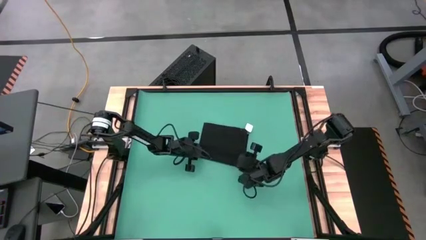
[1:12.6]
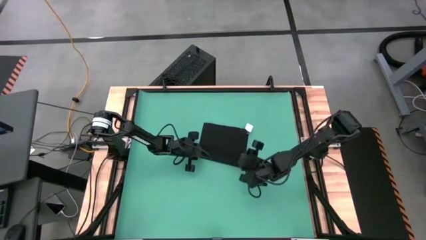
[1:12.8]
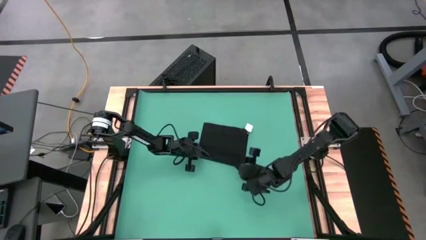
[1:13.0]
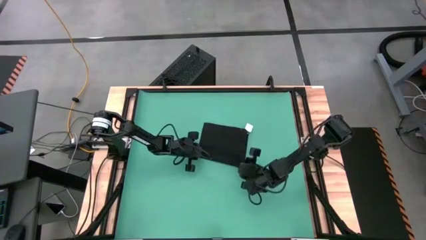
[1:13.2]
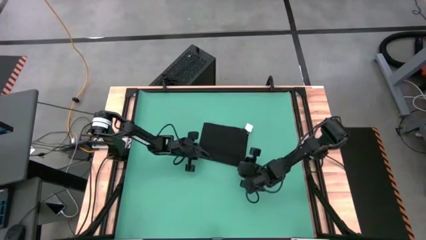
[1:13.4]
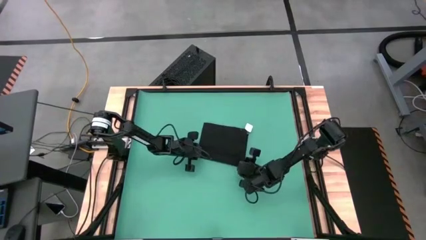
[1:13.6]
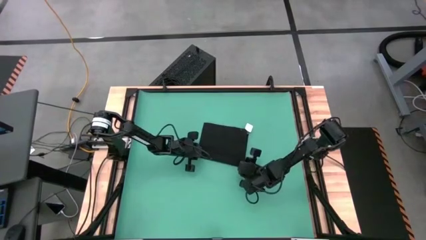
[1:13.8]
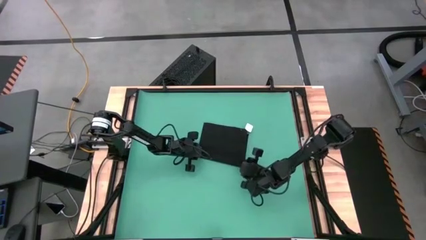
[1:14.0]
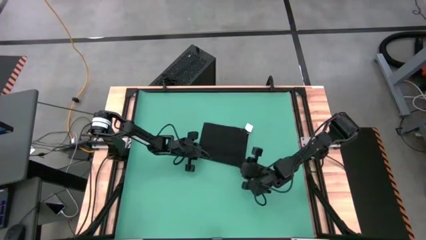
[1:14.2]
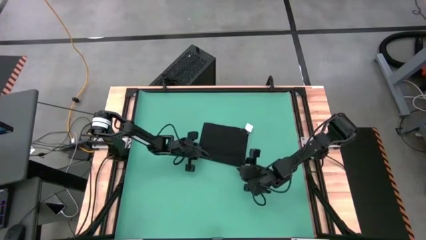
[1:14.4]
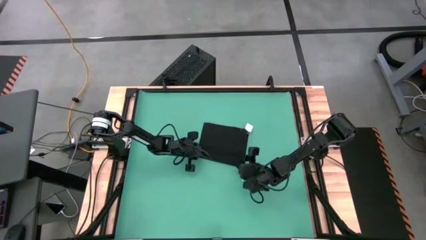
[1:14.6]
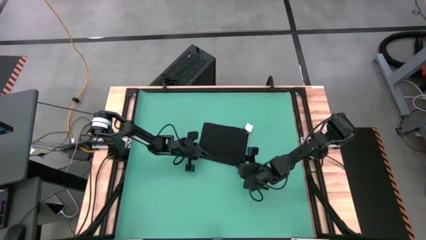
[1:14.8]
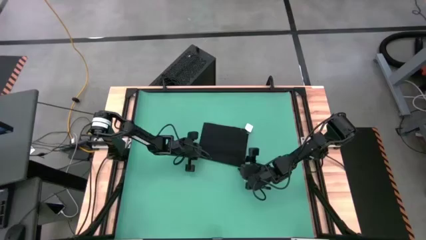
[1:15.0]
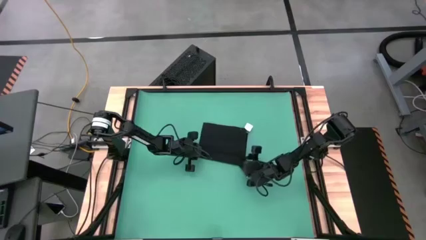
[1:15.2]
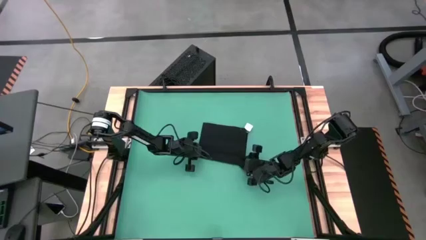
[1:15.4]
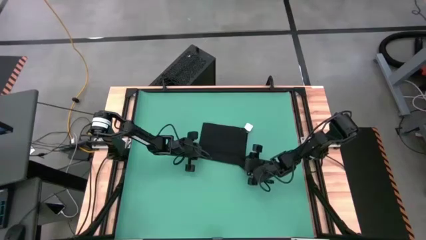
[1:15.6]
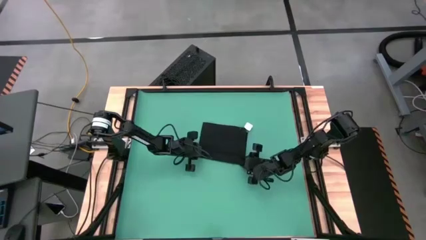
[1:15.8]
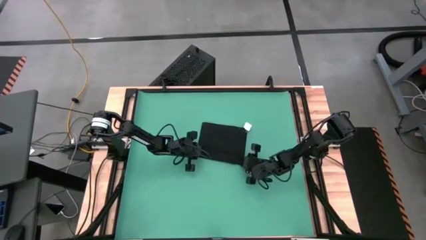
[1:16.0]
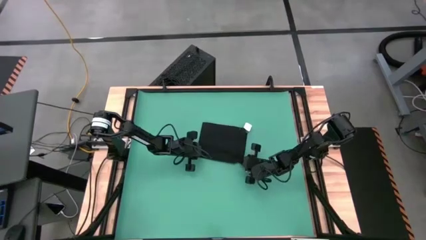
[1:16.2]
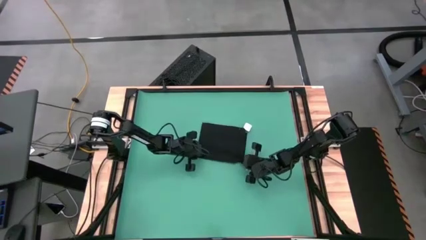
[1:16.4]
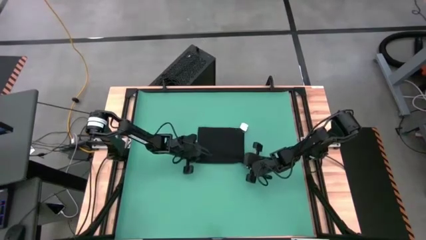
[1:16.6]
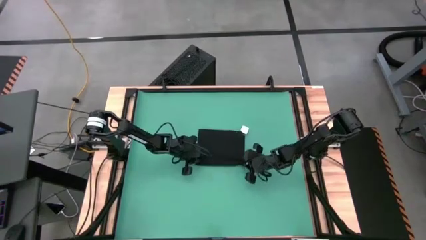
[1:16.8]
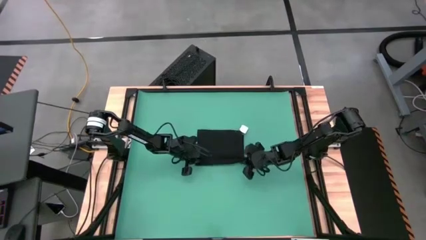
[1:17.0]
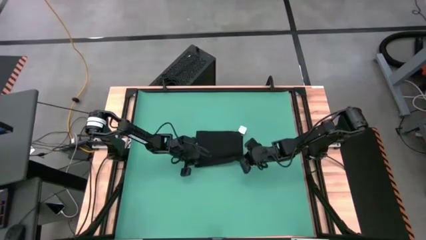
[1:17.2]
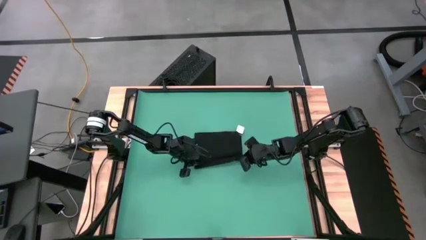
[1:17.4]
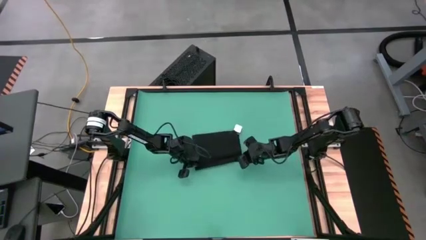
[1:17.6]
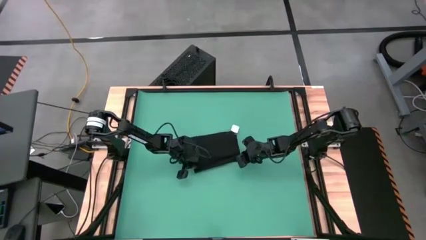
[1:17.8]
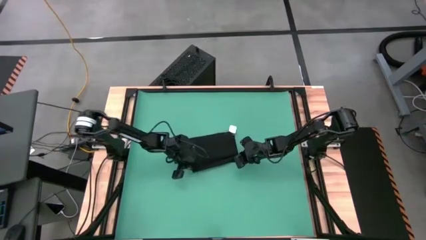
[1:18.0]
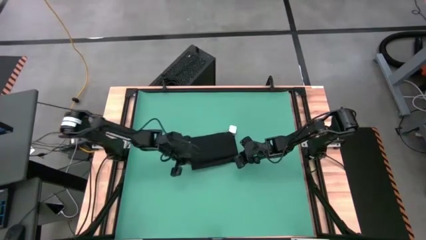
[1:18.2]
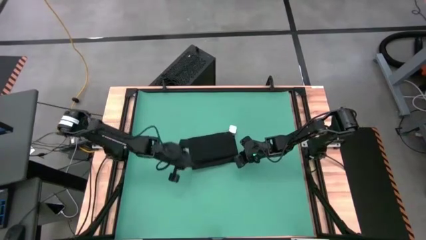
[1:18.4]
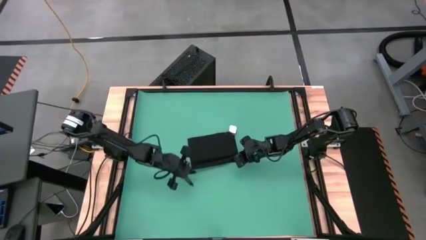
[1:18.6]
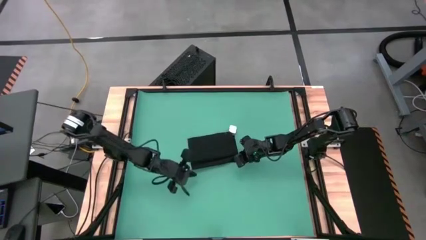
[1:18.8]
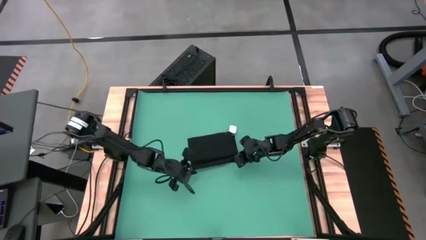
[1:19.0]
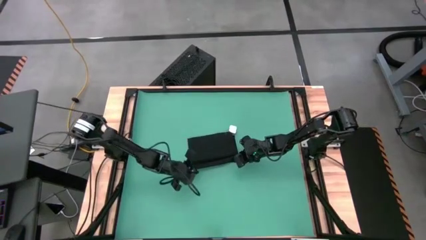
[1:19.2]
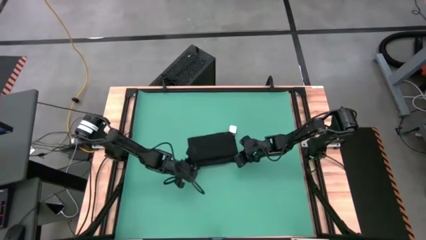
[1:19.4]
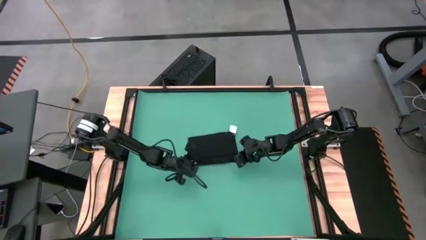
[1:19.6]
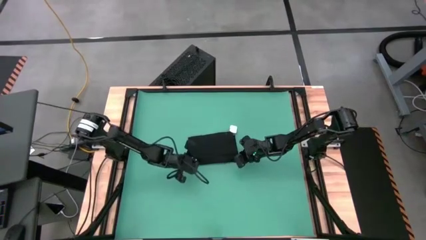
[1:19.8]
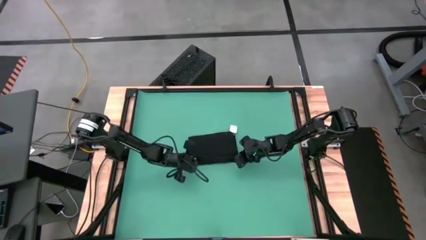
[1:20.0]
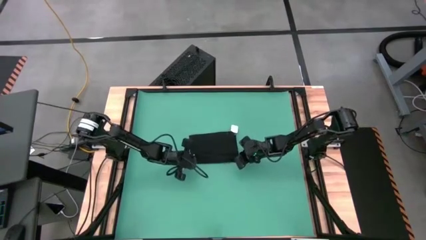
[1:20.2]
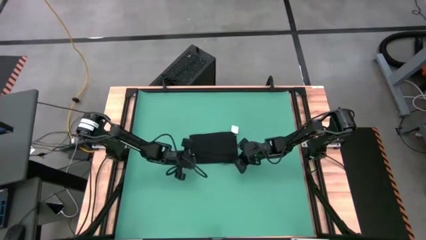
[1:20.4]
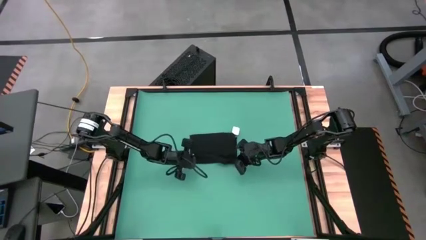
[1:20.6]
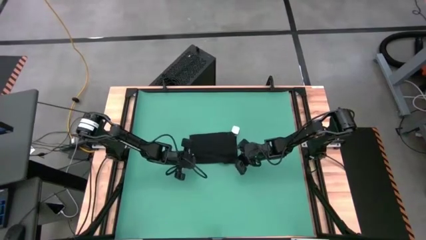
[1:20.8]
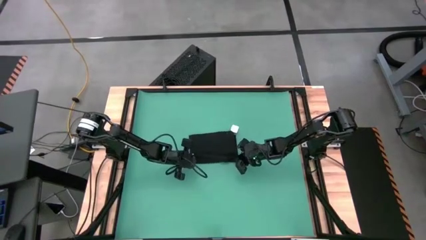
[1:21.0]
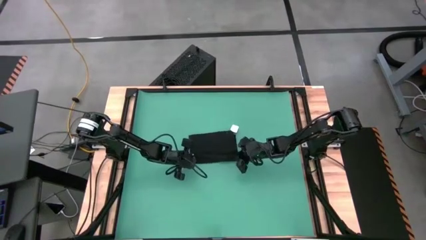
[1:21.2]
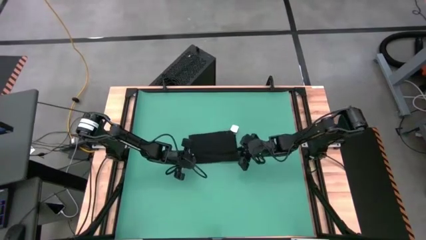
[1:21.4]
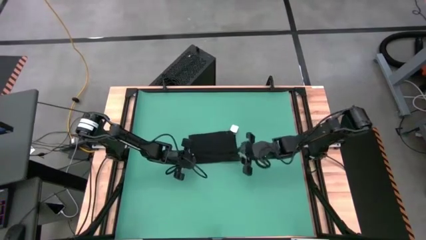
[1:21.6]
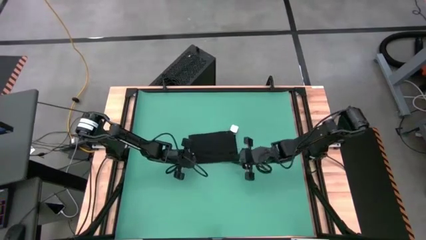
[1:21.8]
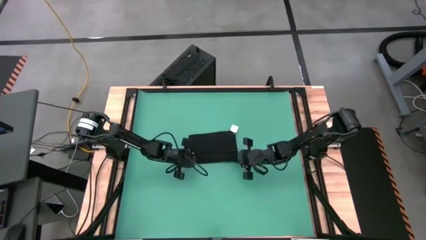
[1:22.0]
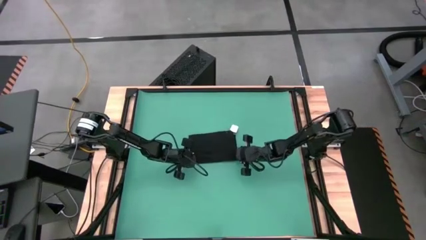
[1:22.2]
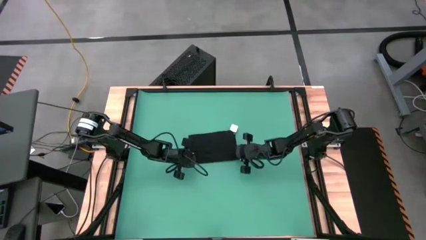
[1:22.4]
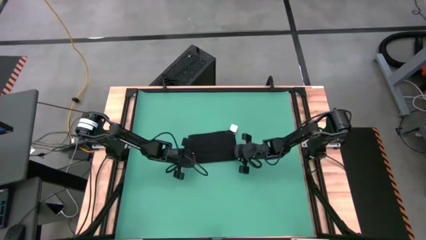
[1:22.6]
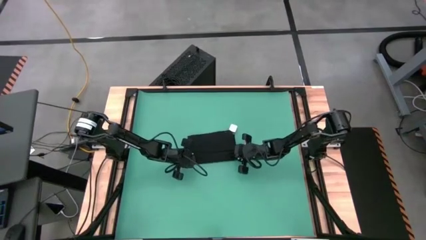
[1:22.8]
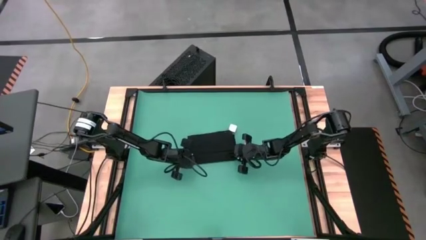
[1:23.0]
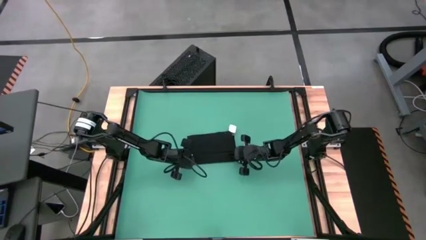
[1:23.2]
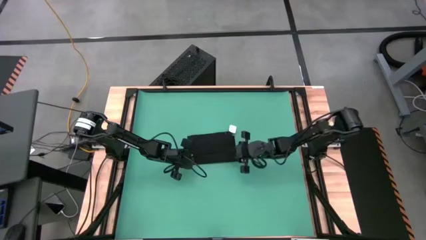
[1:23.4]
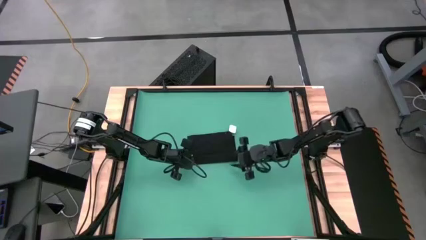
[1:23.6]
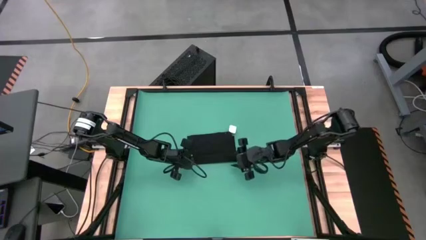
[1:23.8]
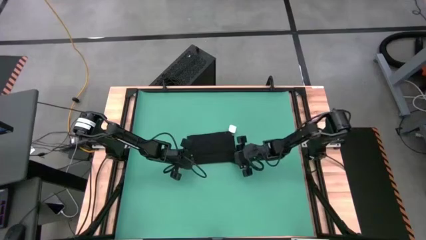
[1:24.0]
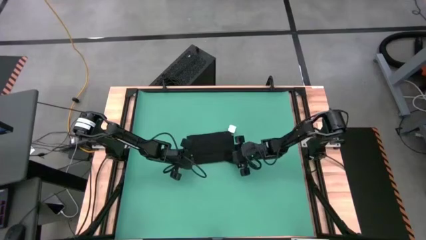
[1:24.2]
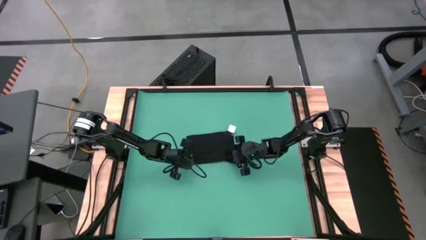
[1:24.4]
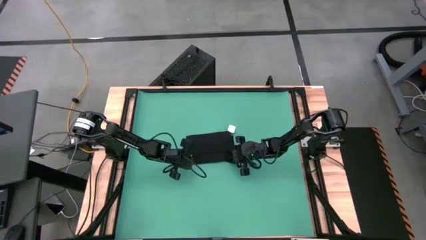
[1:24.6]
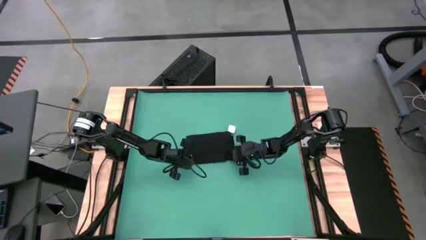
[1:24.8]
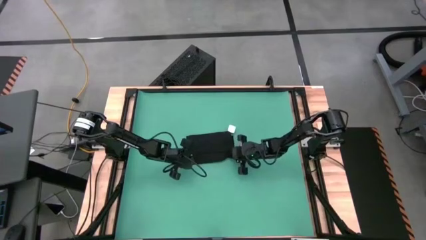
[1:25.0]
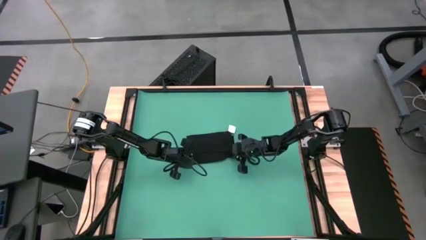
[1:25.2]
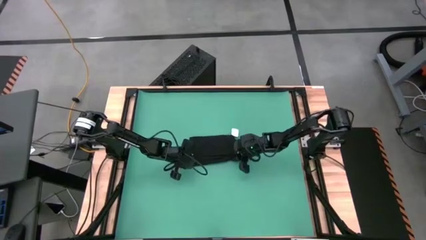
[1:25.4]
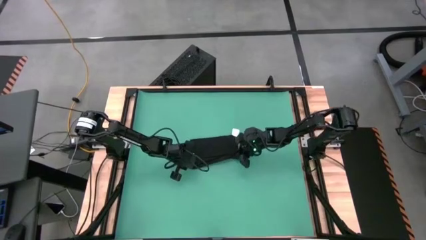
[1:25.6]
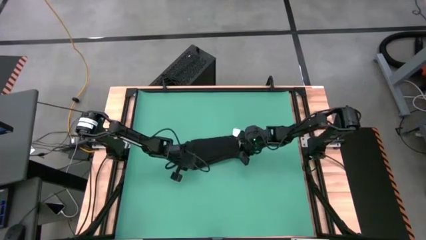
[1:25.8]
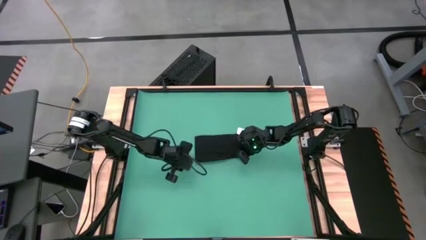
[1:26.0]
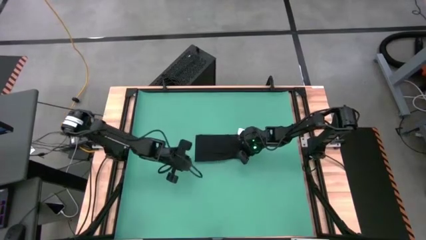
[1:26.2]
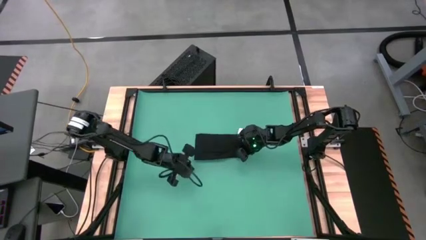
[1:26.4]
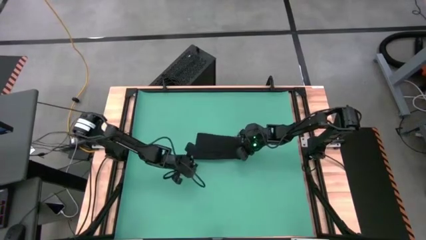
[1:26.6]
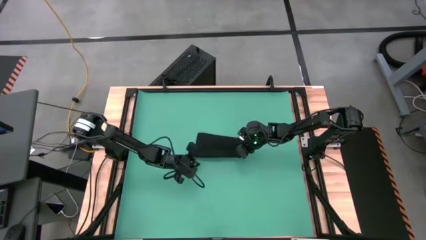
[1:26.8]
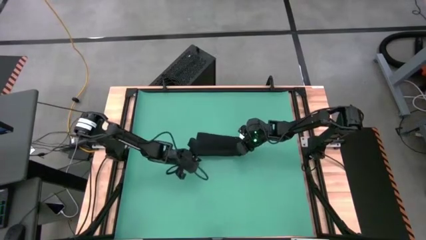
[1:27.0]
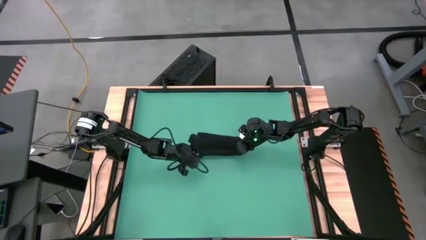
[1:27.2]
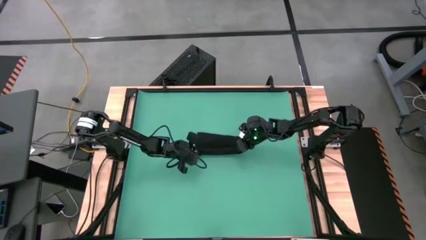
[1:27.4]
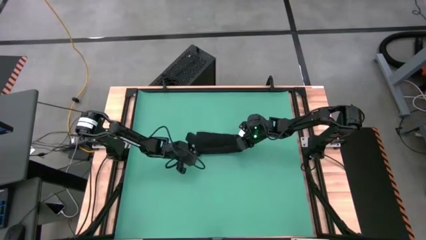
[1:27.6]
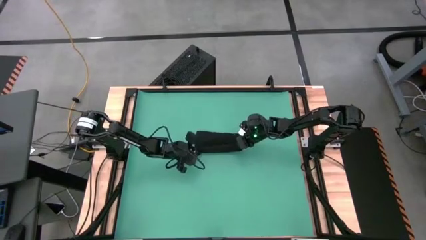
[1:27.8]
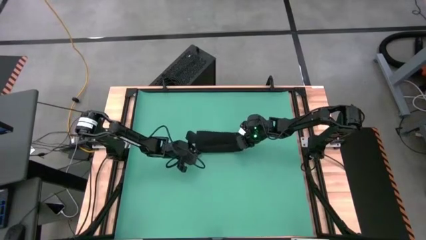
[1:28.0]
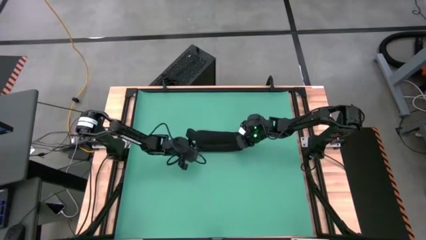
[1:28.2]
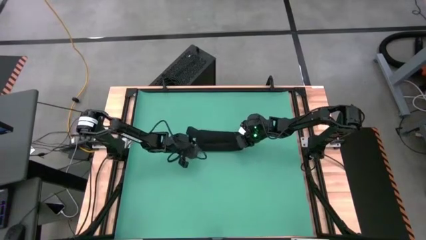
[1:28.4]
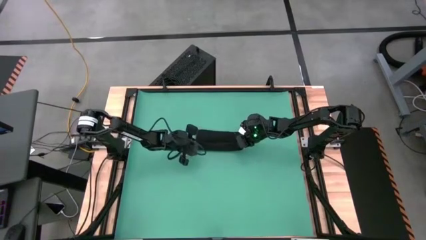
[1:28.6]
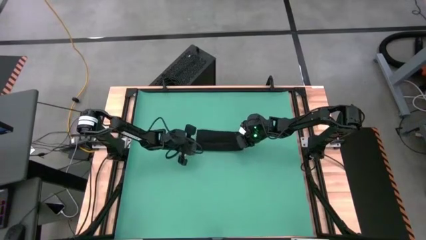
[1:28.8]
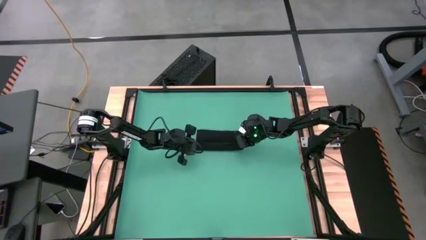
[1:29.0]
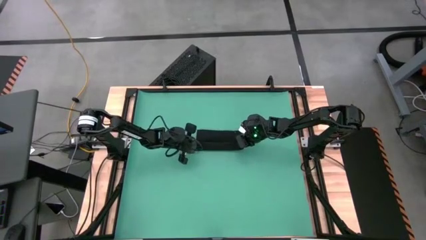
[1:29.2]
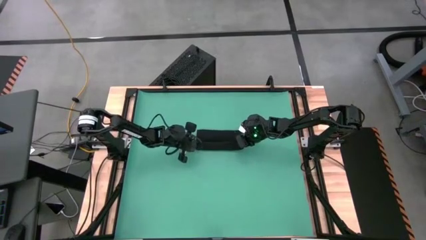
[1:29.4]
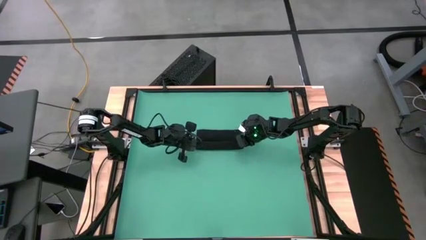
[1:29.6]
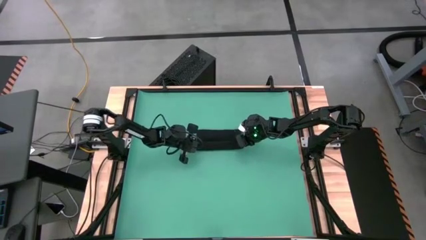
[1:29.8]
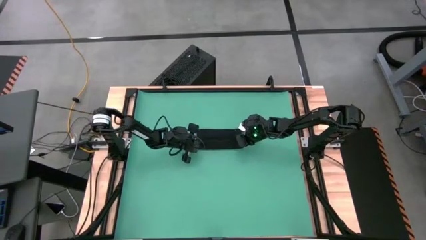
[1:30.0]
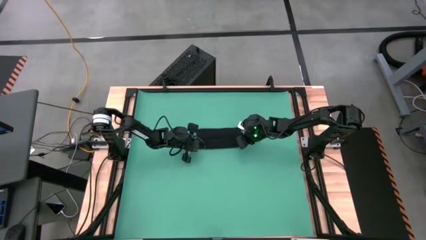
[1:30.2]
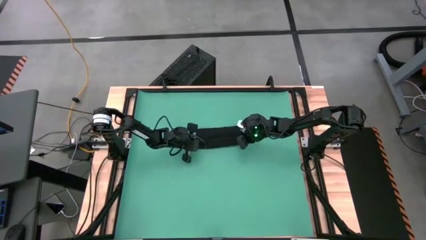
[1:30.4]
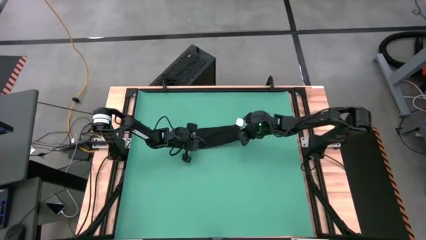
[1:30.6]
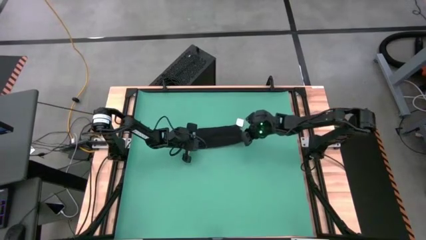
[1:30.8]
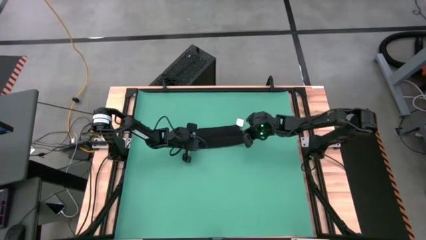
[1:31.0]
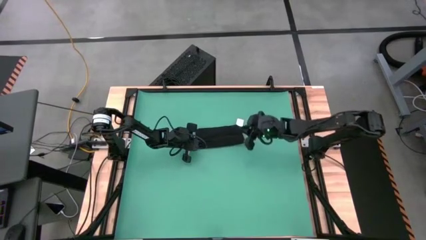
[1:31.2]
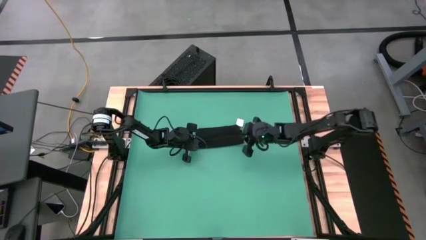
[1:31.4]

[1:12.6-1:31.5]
Task: Roll towel
Roll the black towel
